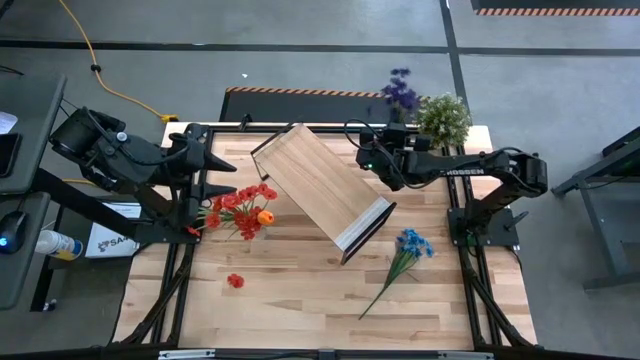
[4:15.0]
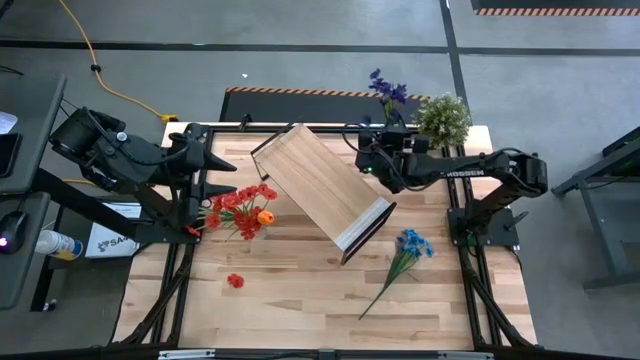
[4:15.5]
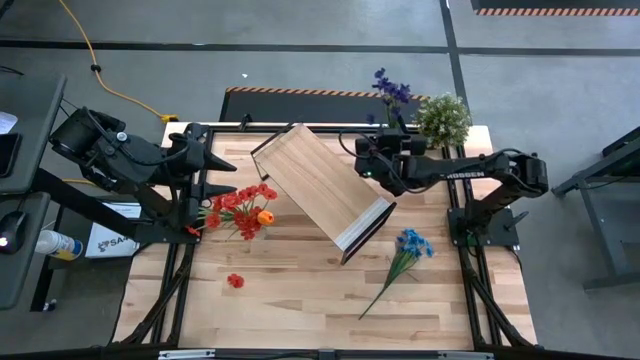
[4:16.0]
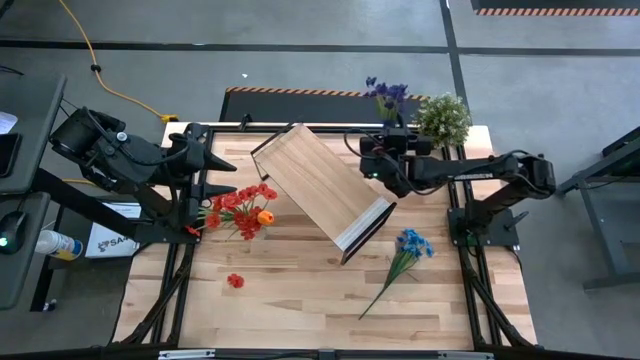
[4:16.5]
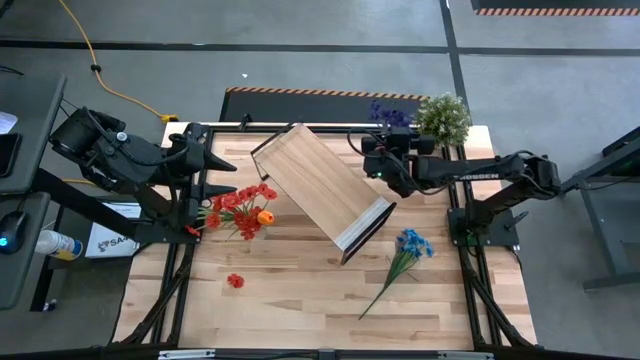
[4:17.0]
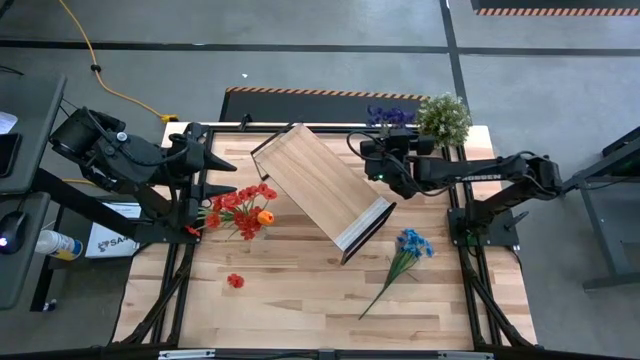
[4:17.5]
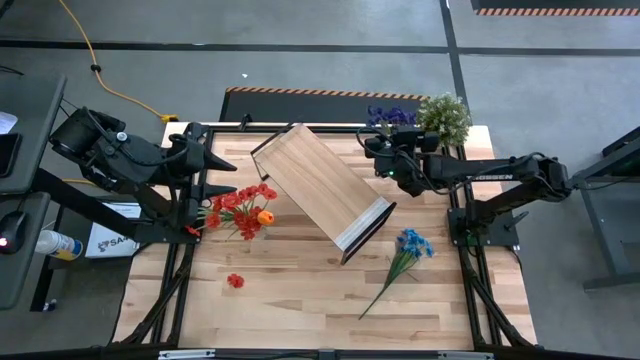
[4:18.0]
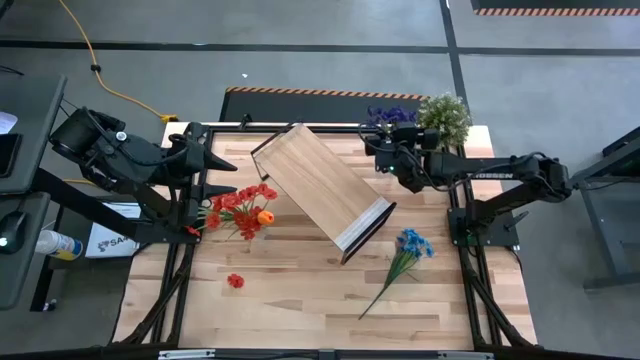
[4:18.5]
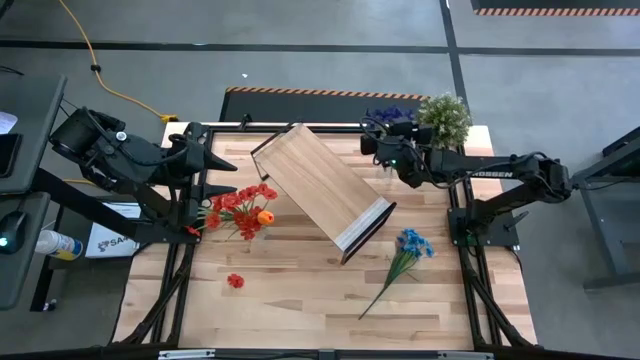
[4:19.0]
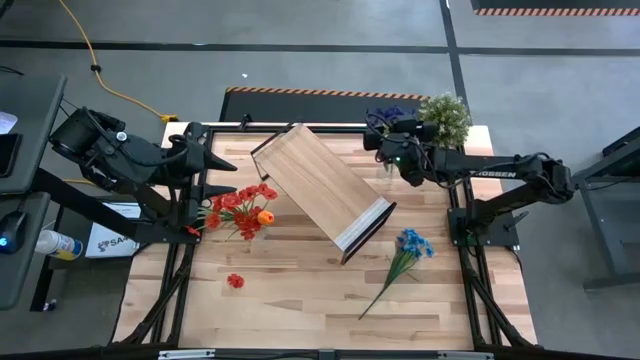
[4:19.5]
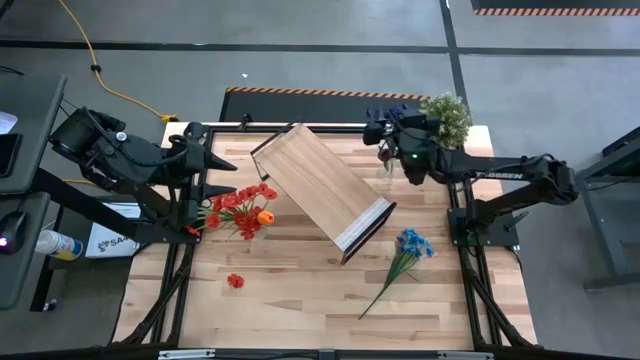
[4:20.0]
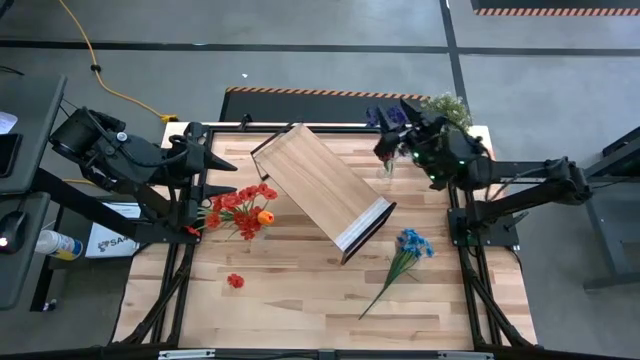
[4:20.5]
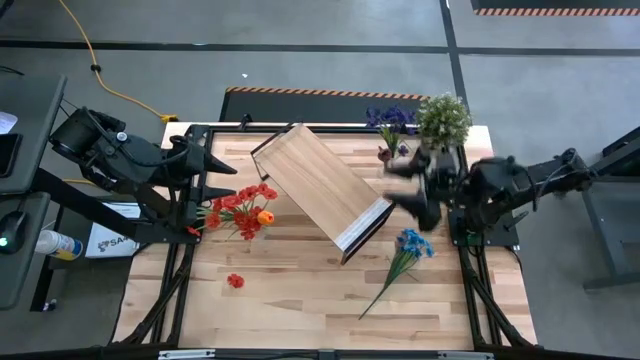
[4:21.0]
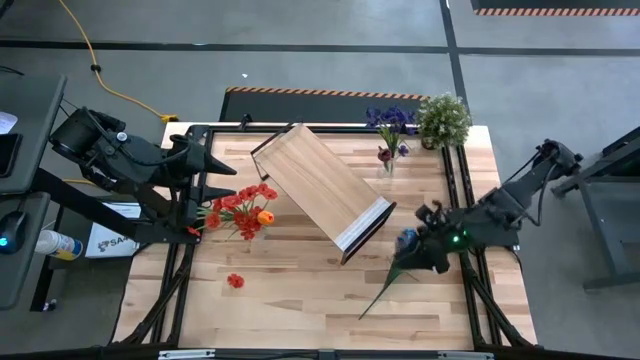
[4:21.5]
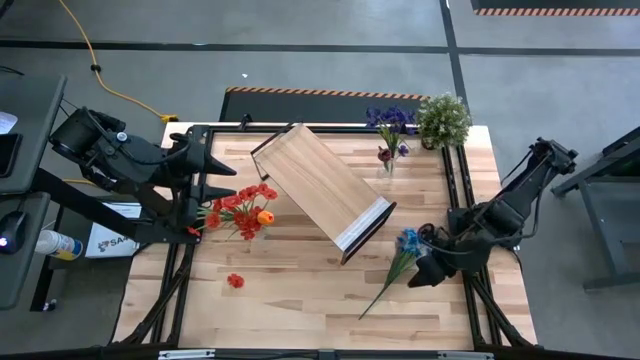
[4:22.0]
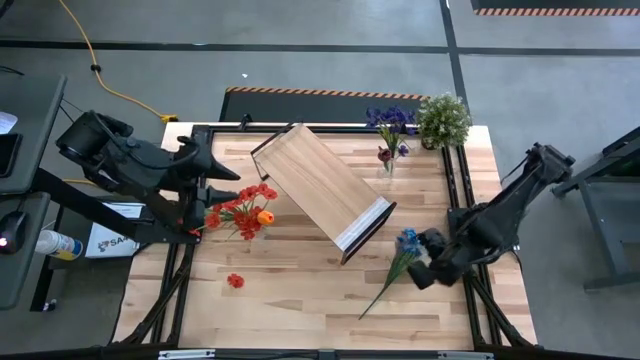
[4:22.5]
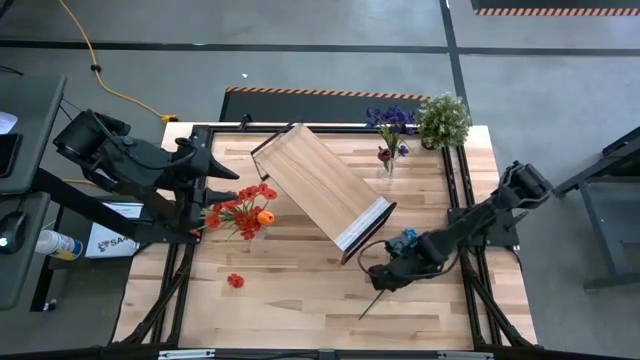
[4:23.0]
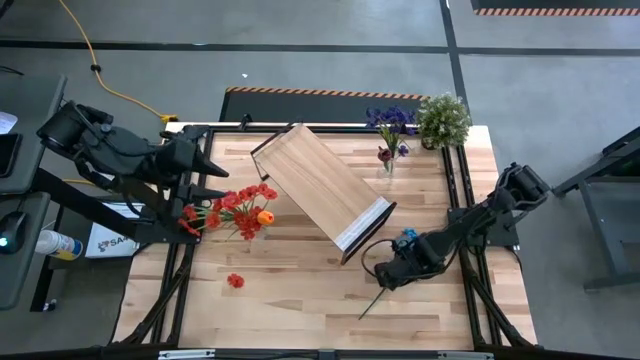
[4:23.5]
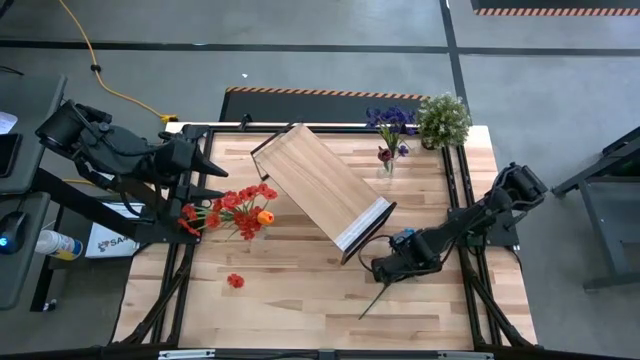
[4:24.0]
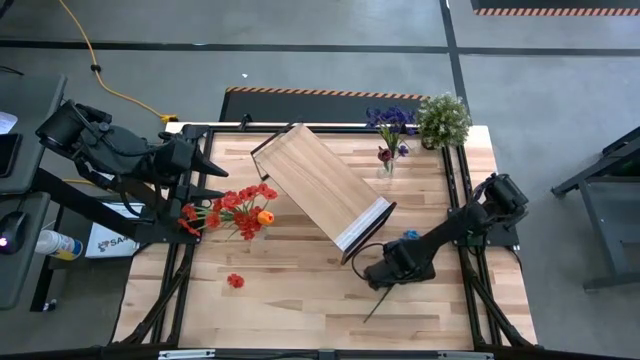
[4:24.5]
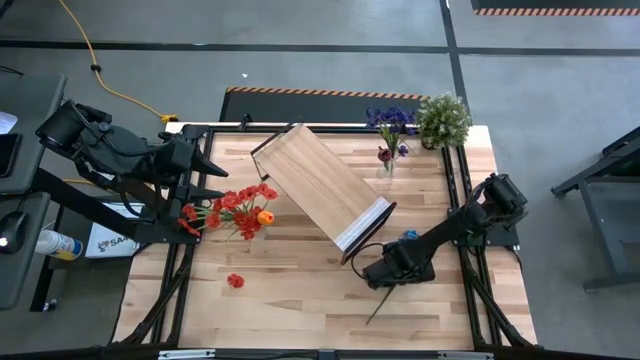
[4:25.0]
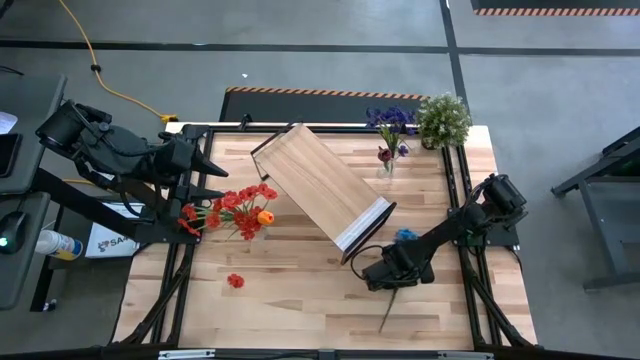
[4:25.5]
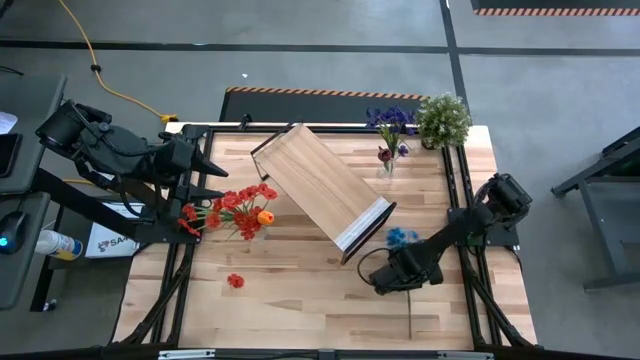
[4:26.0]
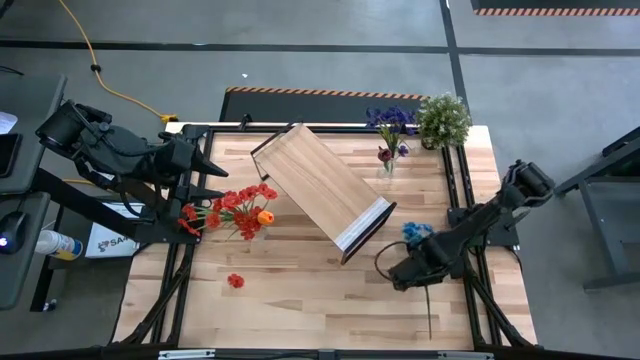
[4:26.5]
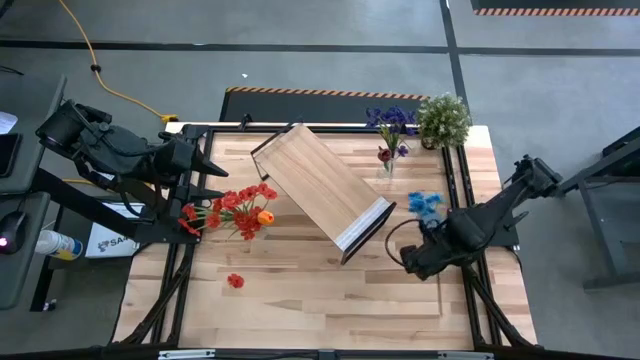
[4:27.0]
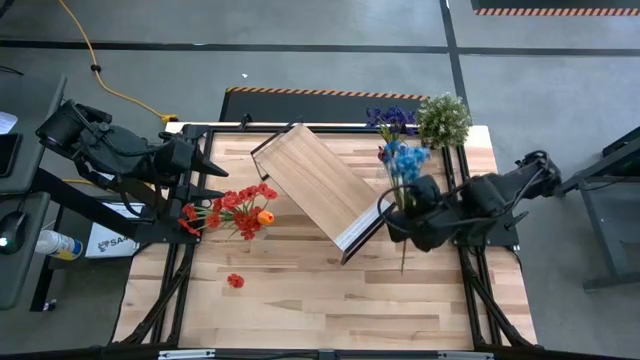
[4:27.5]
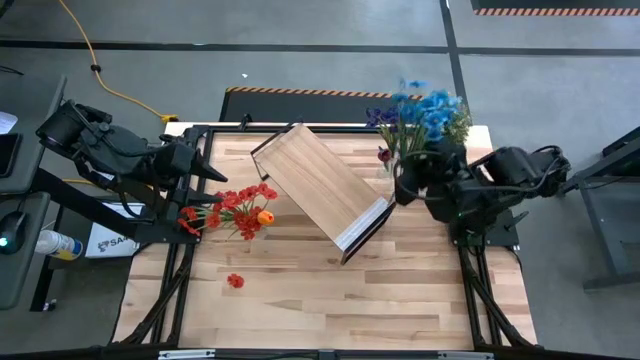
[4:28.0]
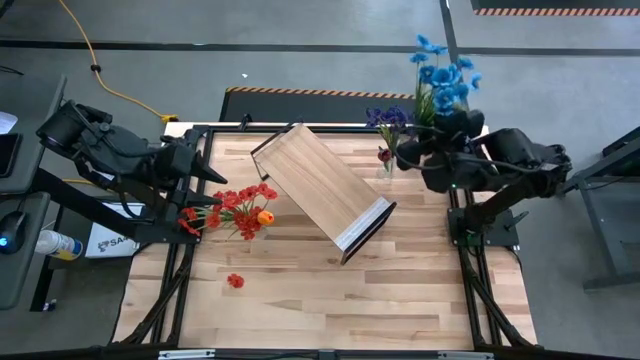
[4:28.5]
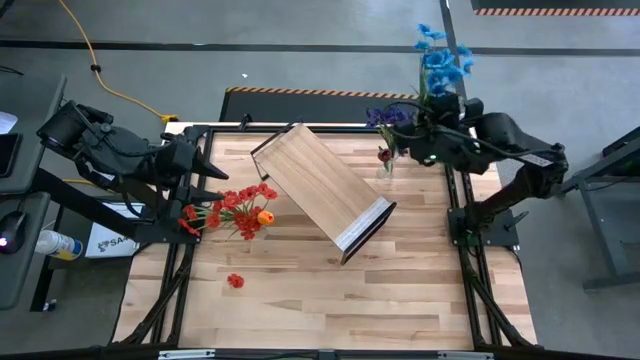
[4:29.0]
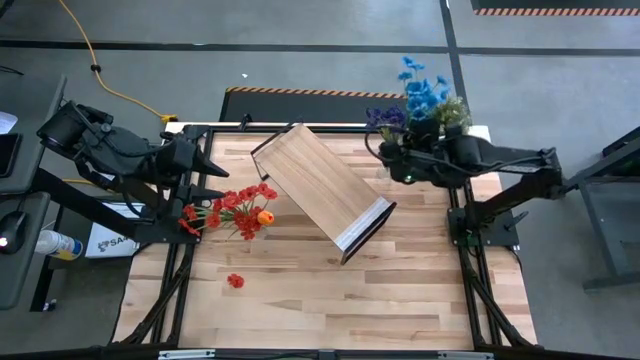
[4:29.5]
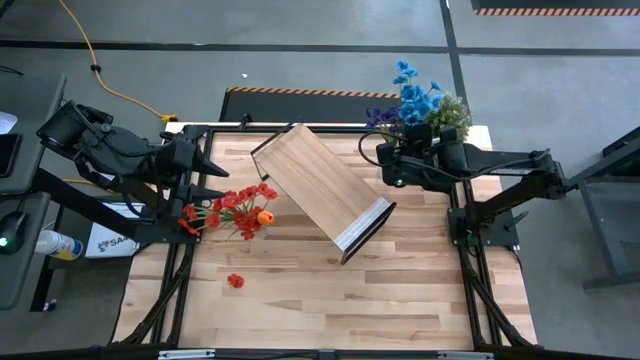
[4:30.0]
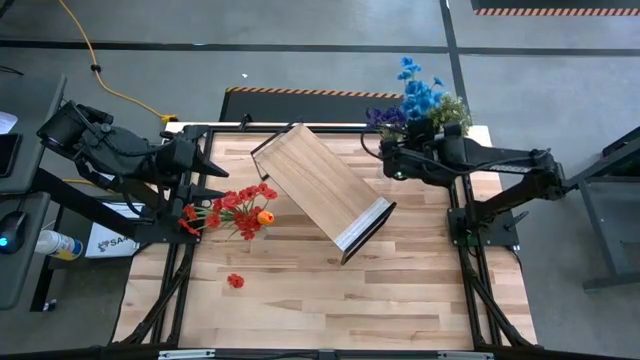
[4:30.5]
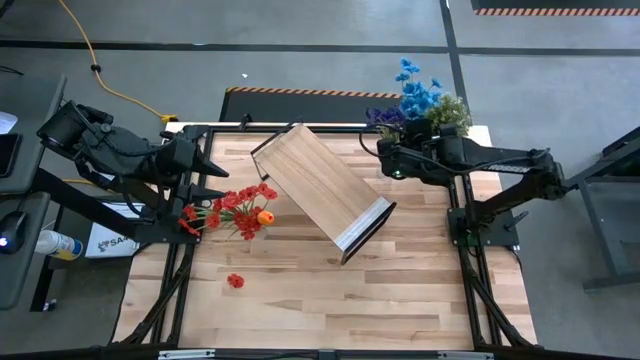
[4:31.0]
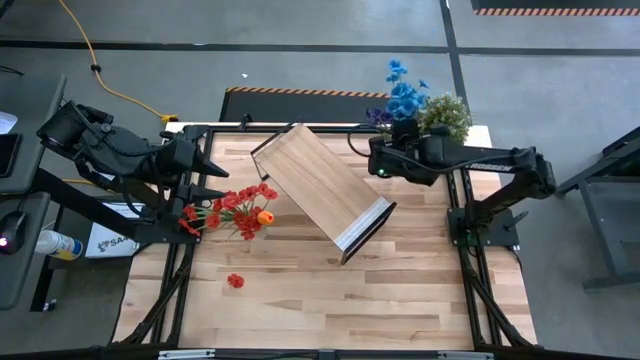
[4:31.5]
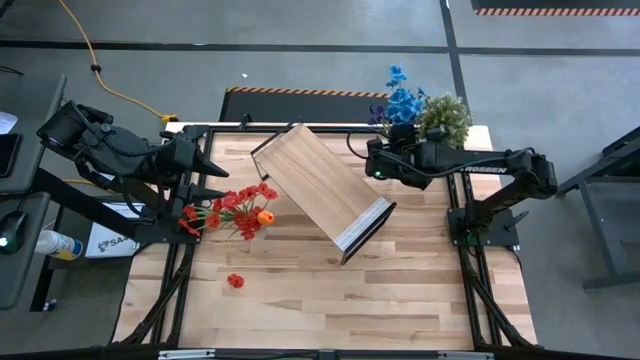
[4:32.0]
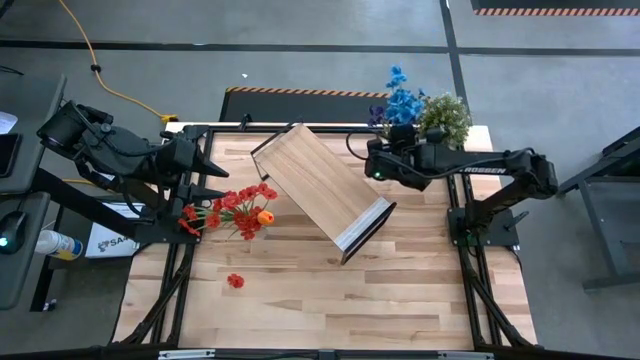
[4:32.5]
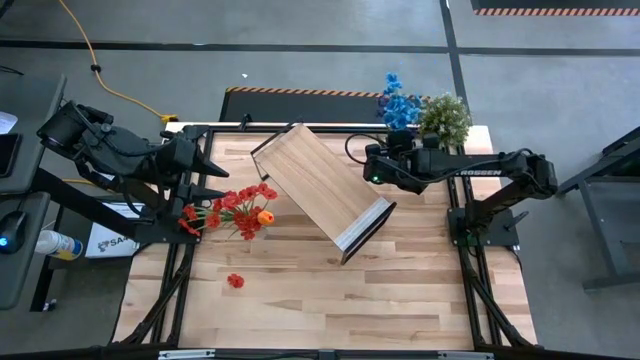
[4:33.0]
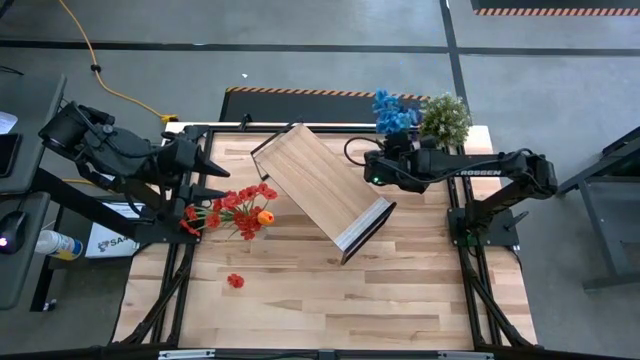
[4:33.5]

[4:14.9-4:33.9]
Task: Pick and place flowers into a vace then onto a shelf
Put the blue flowers into the top transparent vase

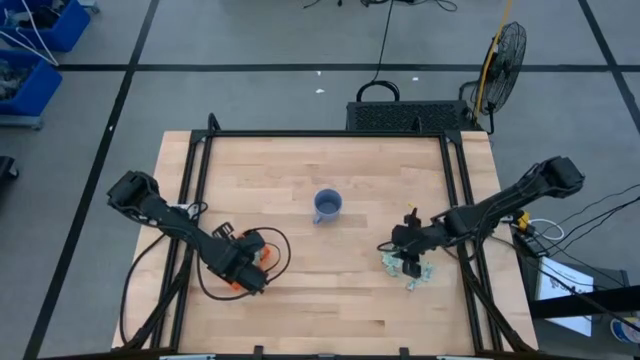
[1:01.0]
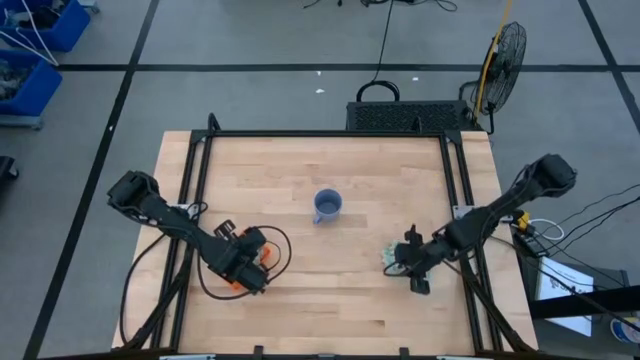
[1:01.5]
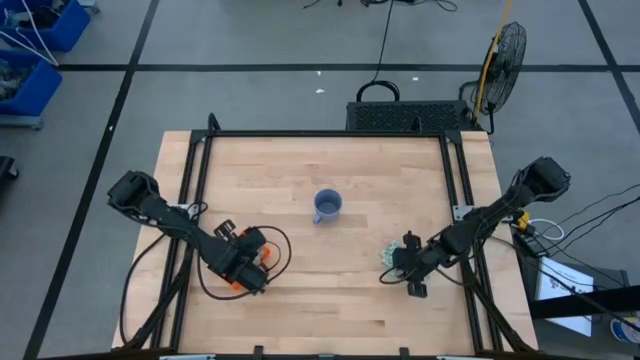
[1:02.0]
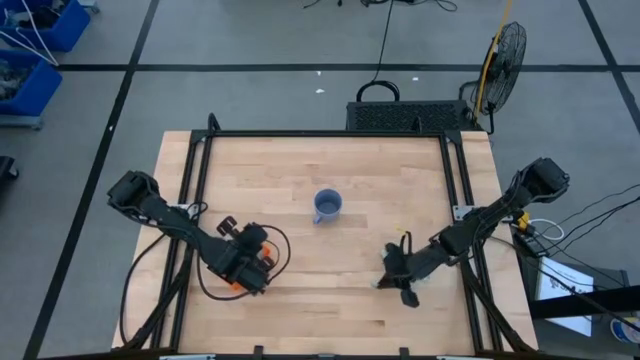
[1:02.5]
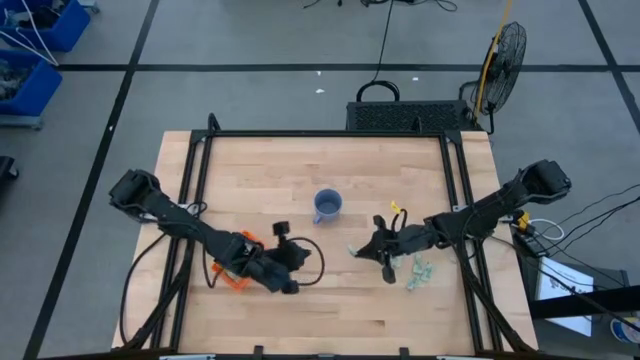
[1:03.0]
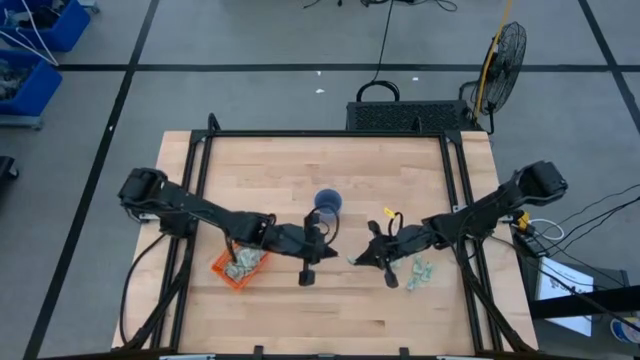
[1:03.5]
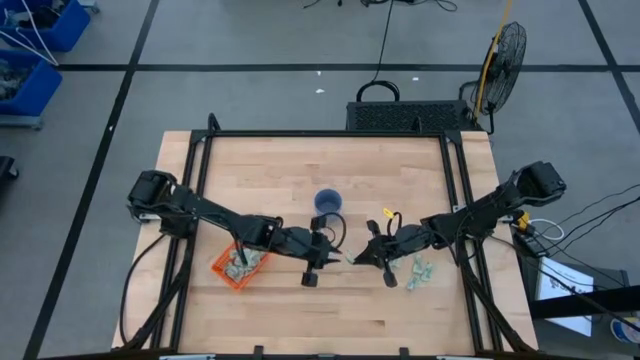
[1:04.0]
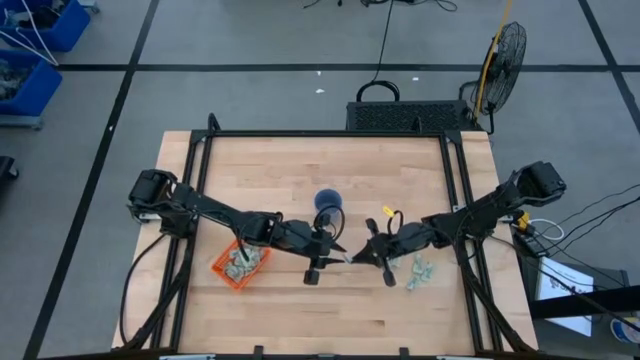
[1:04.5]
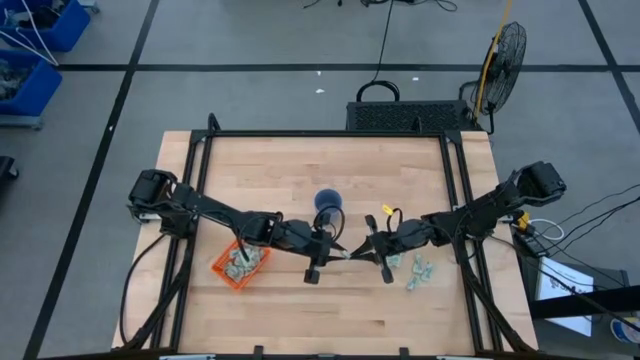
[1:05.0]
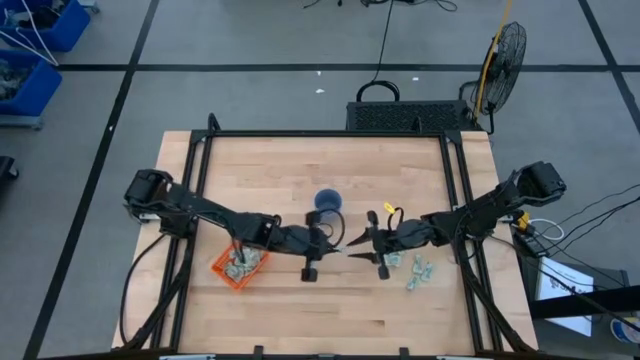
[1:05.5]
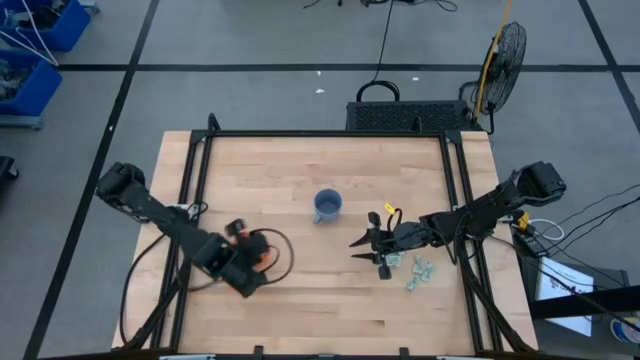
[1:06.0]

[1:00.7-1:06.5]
Task: Pick and place Stevia / Truvia into bins
Put the green stevia packet into the orange basket
